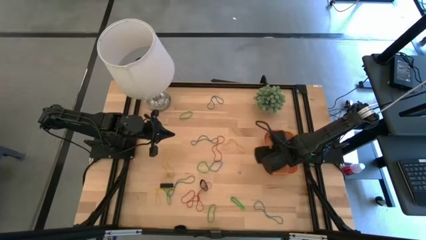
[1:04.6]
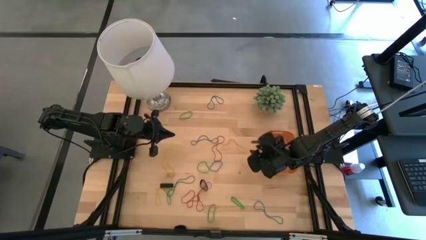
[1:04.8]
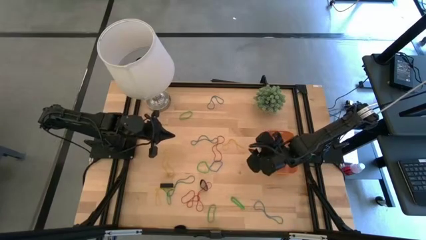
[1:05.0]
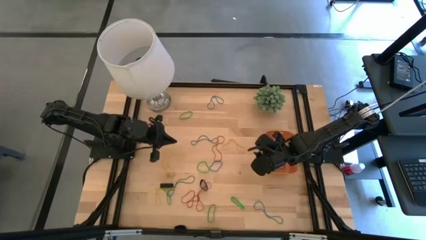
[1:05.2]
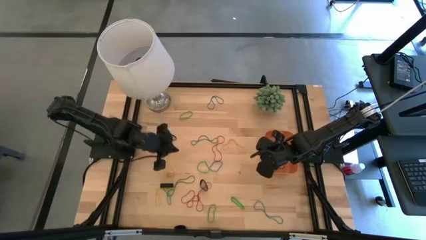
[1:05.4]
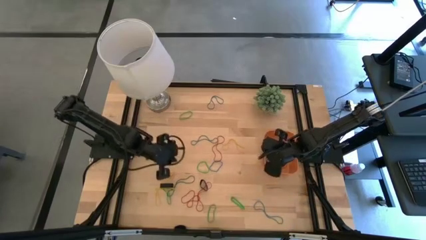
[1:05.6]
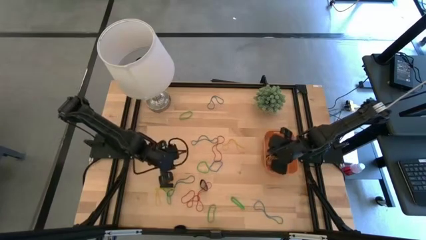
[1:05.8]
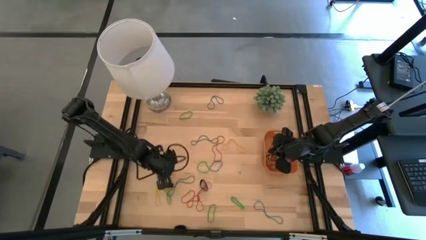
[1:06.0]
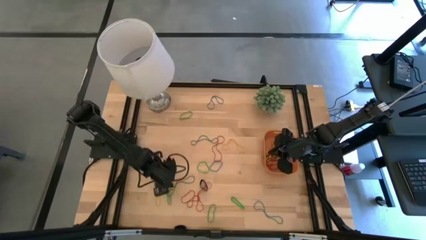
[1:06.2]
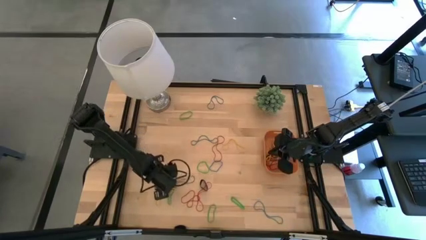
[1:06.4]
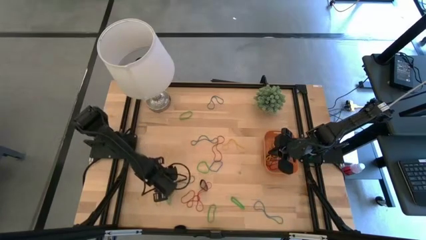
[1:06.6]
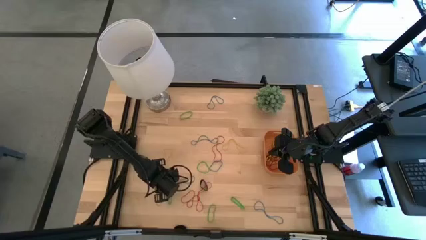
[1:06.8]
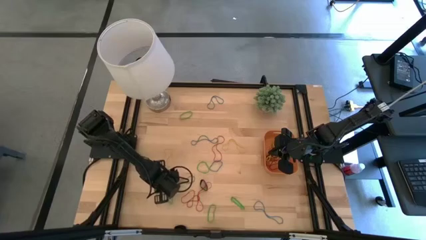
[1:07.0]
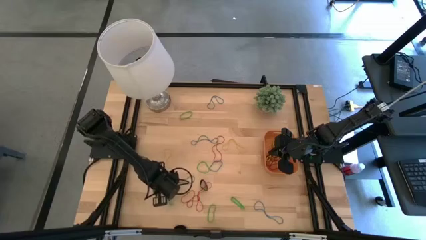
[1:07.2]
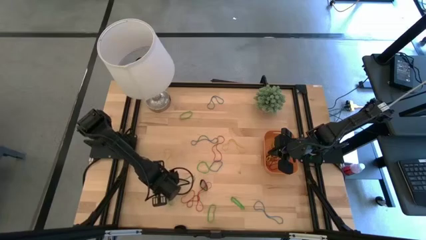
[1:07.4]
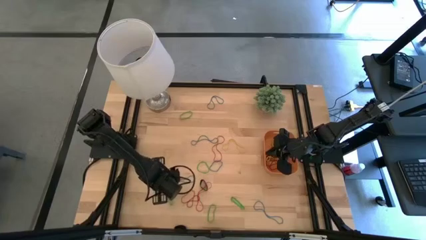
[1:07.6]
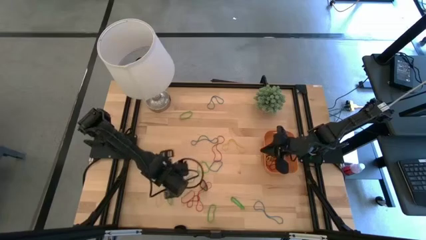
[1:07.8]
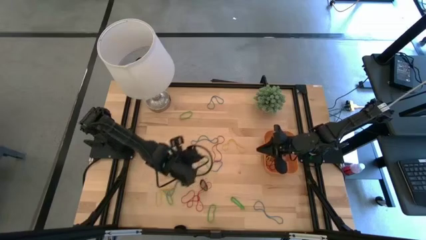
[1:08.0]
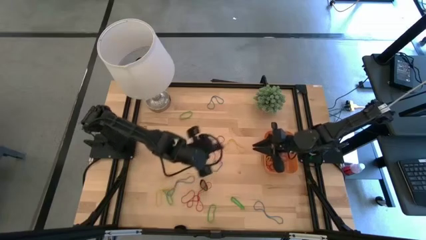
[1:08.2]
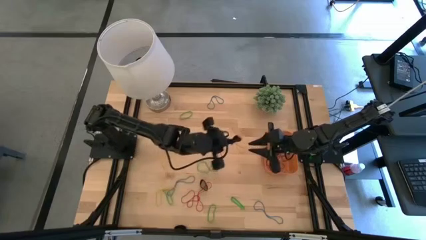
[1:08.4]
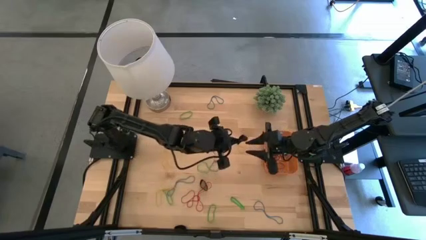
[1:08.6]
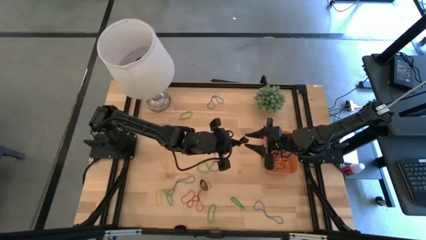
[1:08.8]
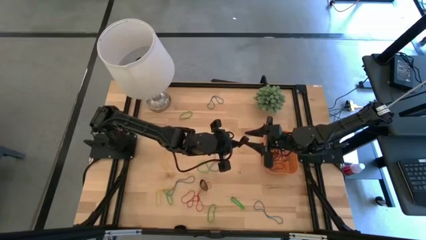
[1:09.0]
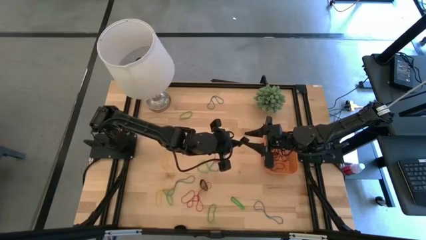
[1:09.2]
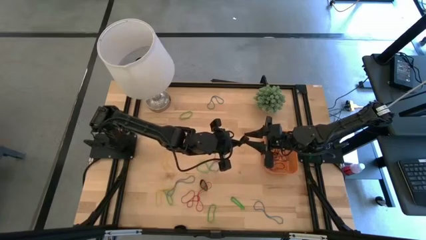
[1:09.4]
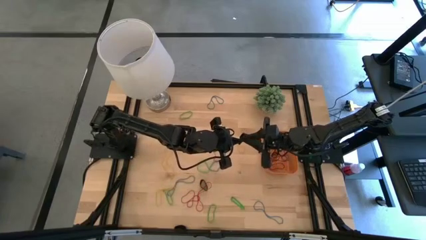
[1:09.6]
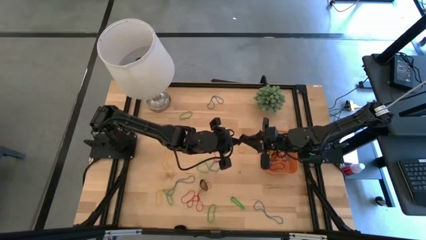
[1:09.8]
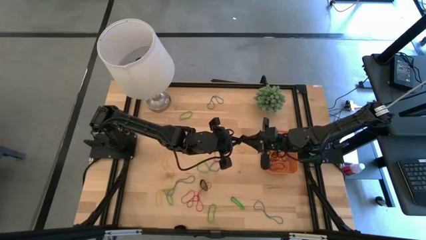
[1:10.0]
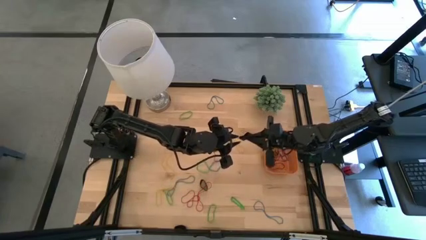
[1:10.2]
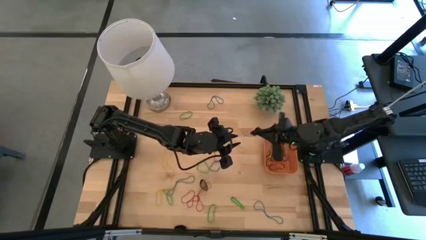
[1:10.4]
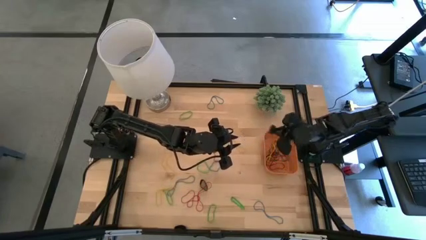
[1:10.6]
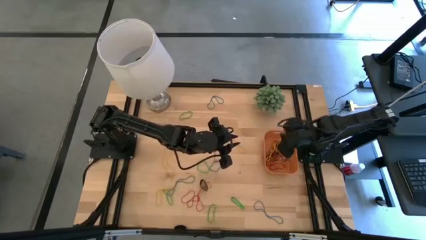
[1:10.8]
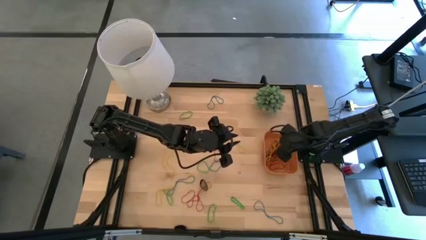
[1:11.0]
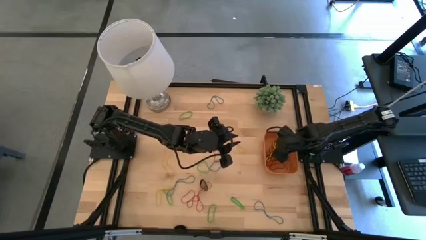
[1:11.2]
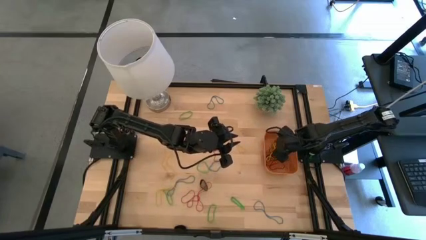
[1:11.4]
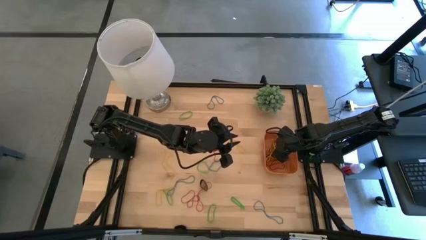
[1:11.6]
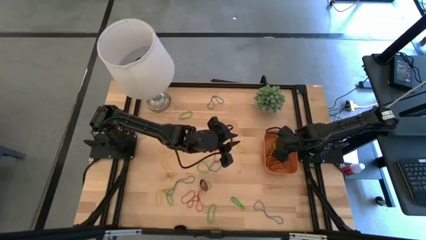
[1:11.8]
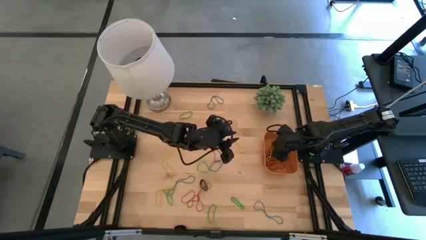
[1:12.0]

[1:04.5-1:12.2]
Task: Pick and place rubber bands into bin
Put the black rubber band into the orange bin

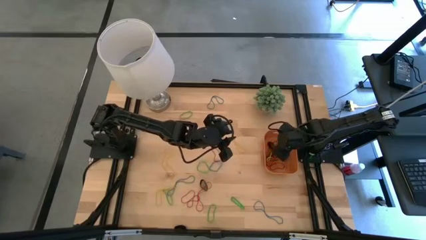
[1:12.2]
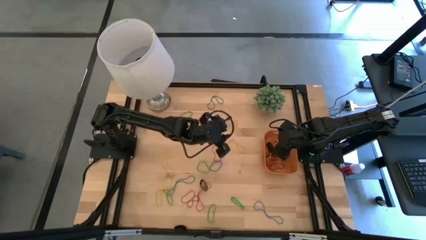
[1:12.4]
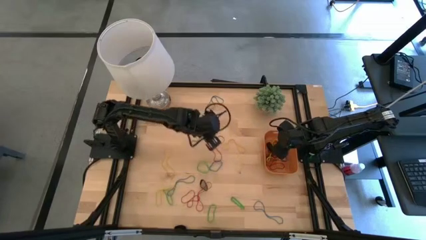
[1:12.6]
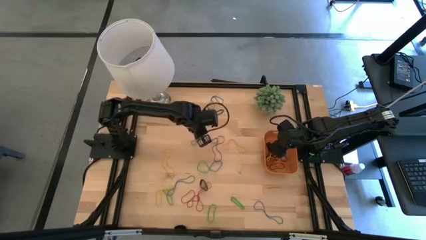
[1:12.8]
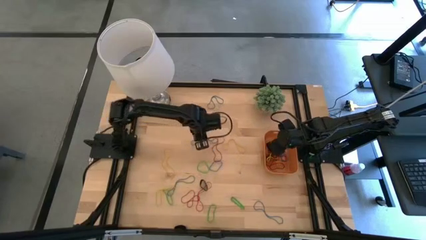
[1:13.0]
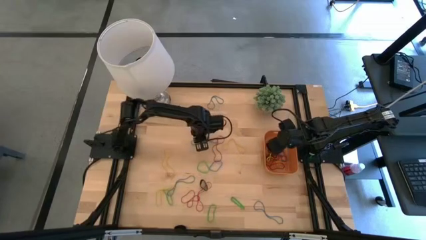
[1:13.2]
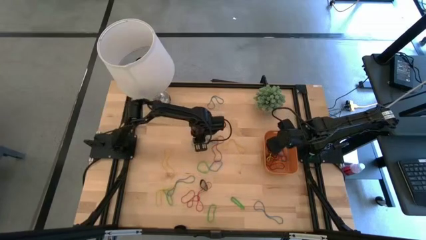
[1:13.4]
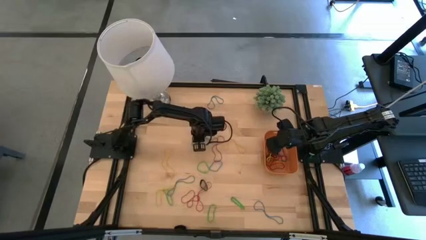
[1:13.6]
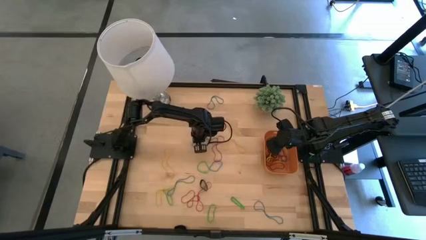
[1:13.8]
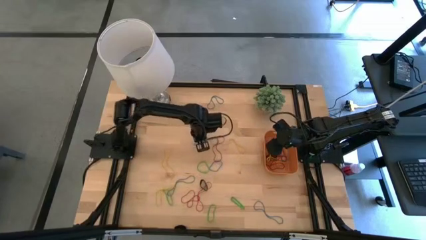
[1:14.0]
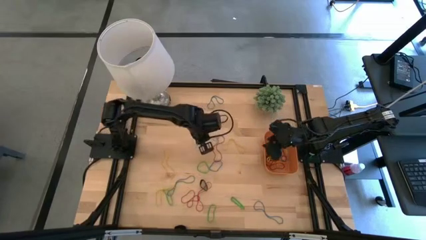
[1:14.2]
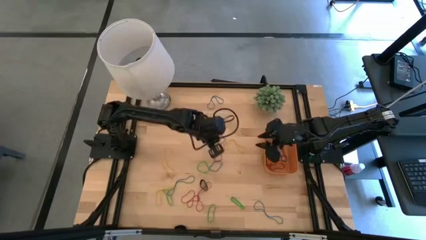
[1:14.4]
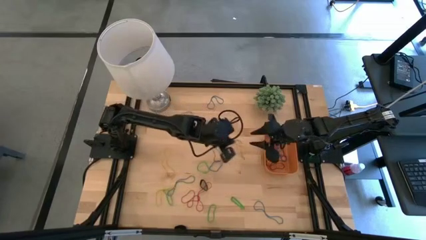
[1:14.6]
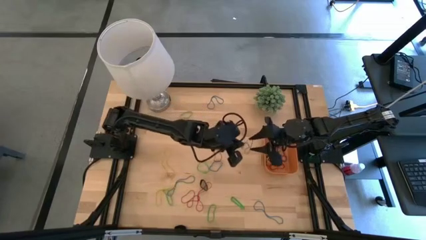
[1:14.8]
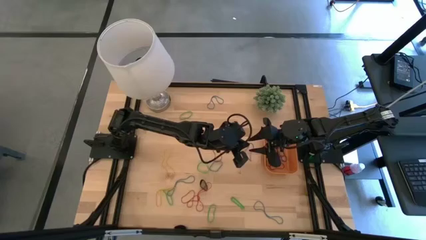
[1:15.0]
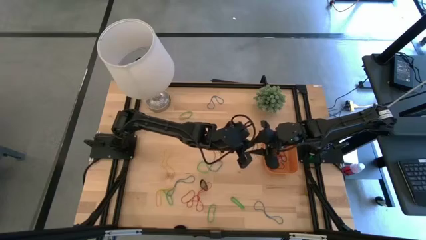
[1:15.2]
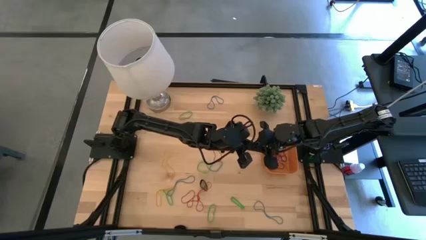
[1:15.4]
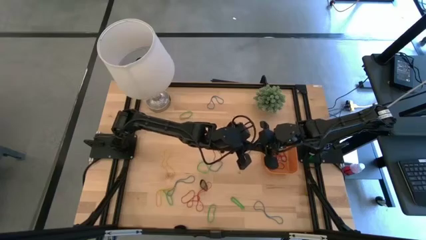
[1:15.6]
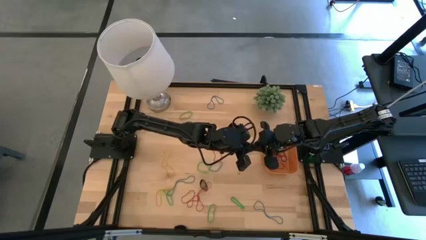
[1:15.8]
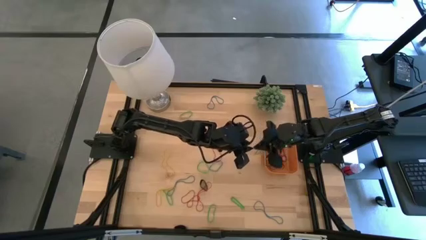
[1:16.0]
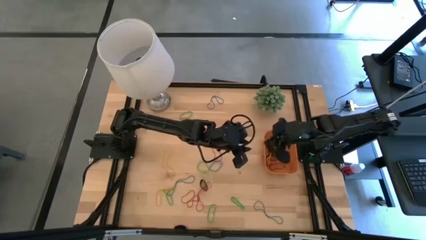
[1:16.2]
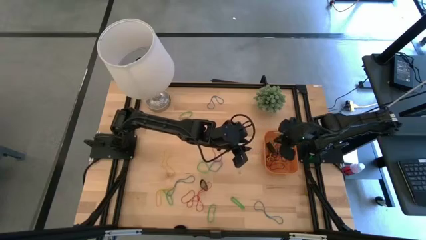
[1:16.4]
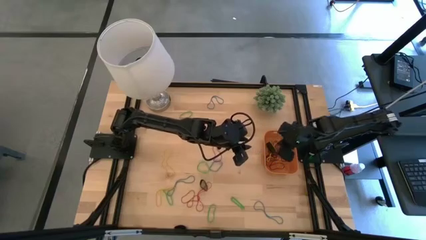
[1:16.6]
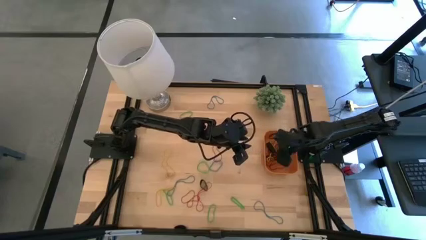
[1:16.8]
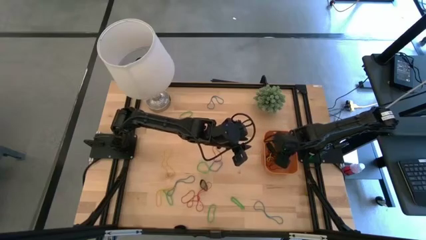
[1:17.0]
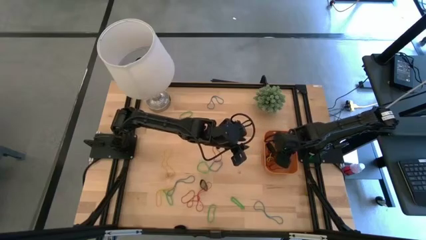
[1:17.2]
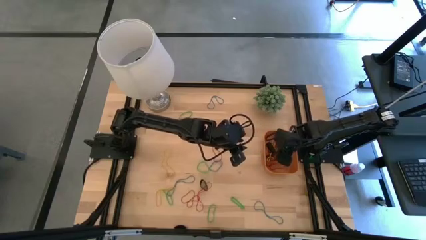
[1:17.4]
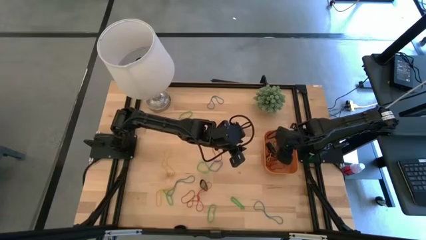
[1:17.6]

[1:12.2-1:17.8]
Put the blue rubber band into the orange bin

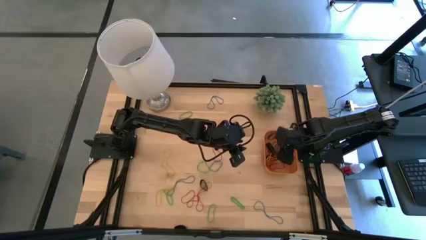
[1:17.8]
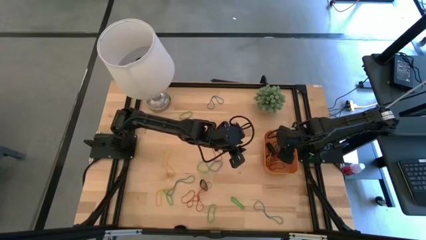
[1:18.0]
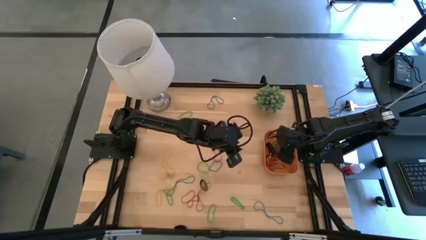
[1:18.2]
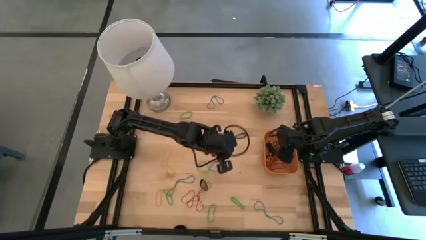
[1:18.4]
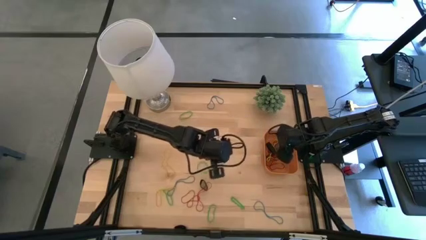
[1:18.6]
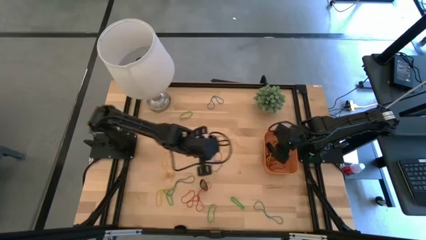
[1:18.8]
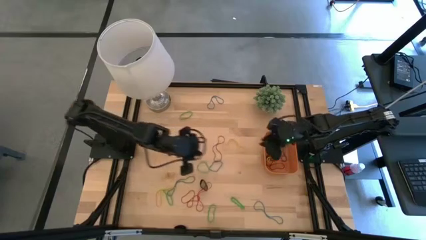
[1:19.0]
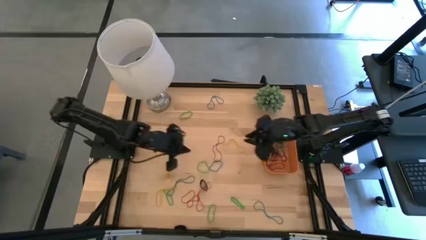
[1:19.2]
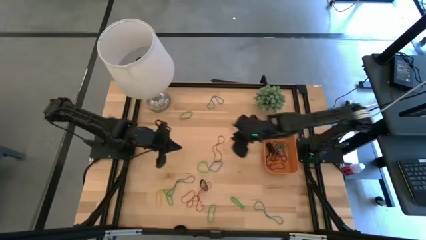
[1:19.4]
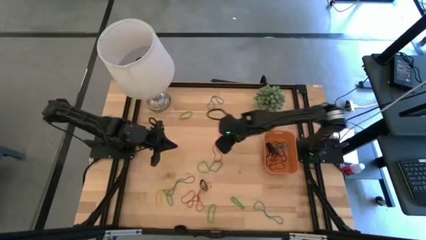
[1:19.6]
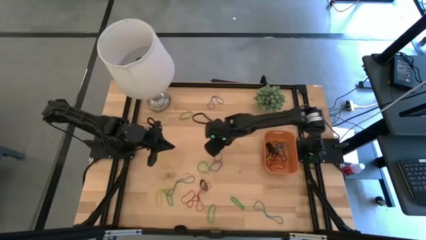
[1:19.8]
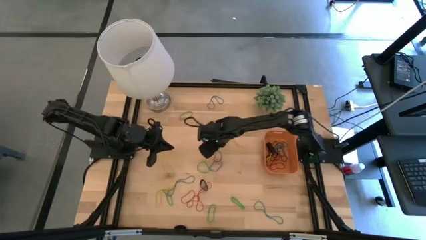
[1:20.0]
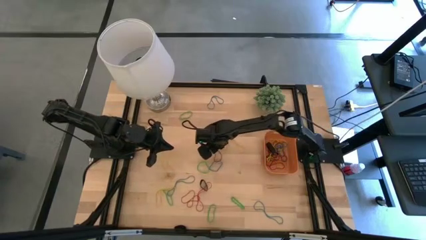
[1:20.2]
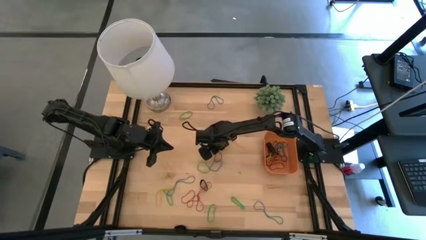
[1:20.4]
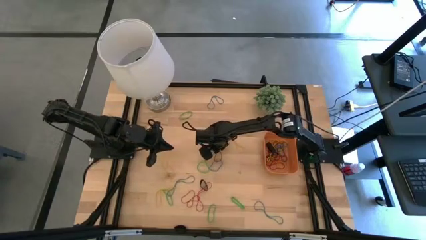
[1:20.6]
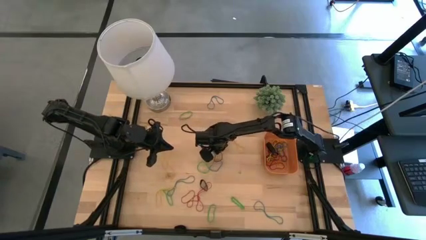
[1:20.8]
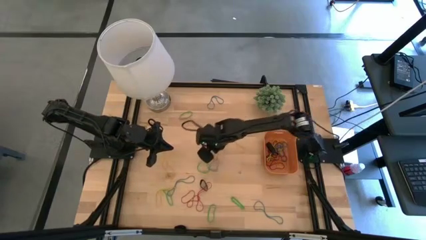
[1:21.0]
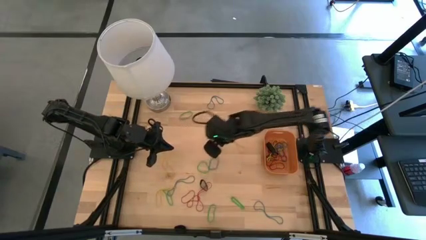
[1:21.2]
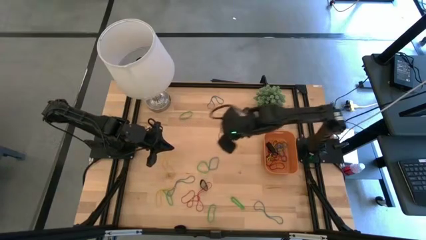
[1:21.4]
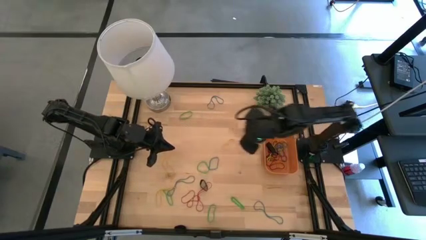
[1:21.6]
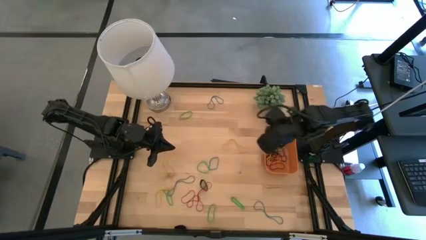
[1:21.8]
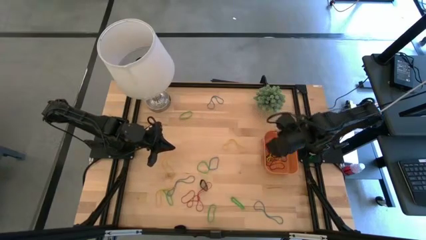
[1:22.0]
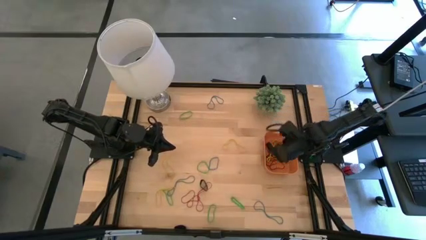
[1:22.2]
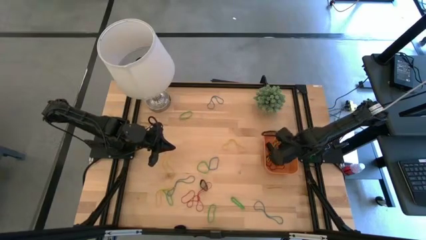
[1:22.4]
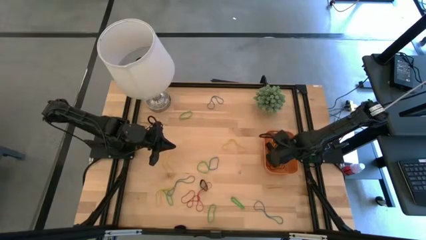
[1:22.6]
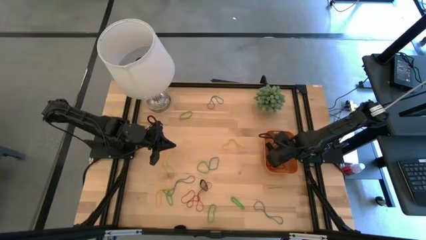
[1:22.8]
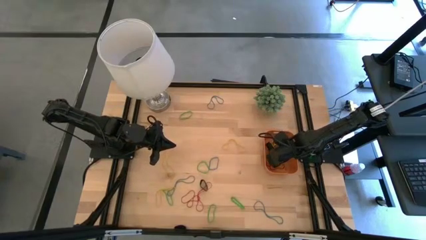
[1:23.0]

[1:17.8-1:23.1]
Put the red rubber band into the orange bin
